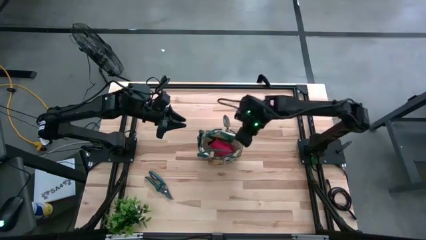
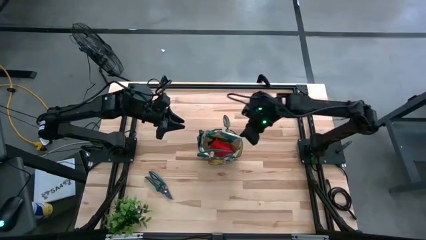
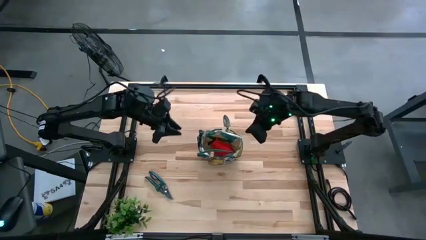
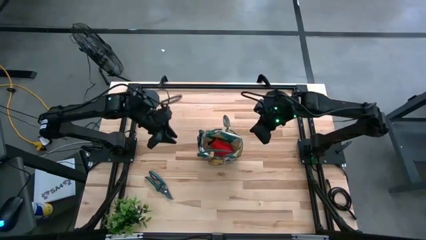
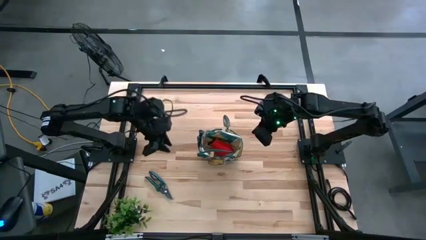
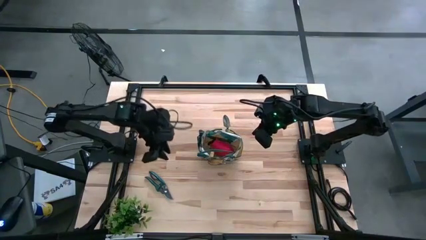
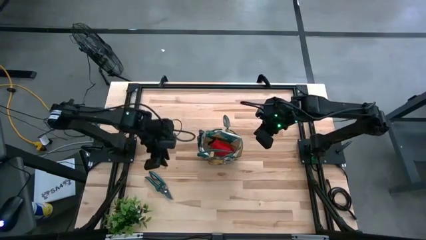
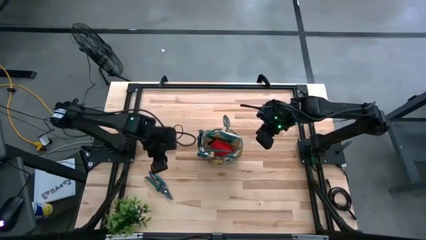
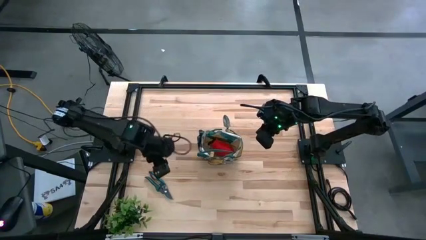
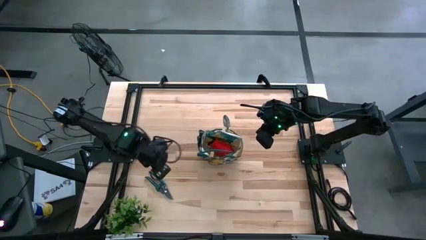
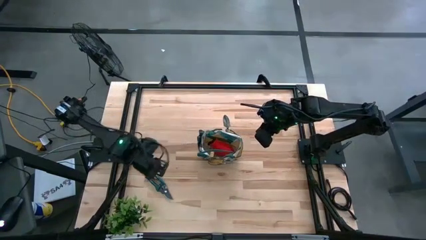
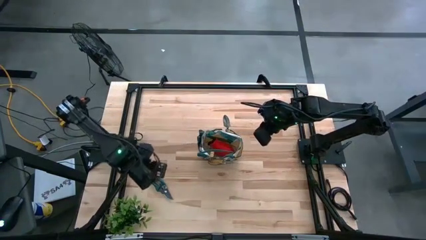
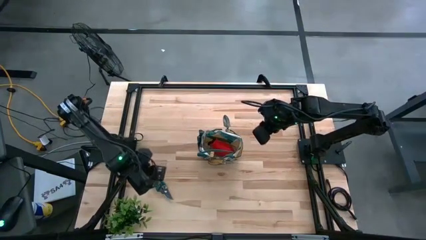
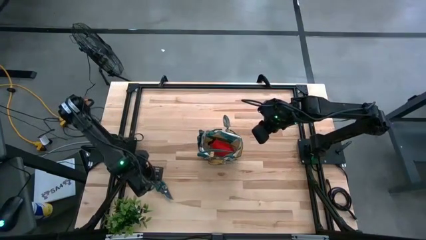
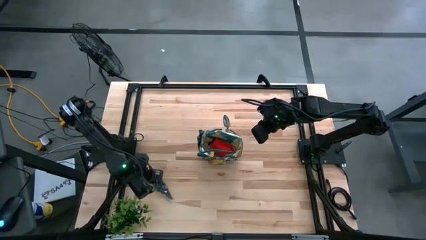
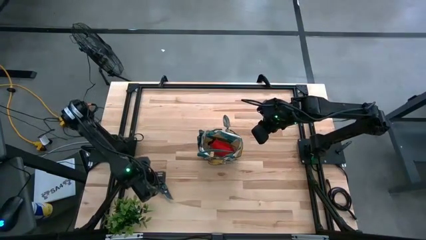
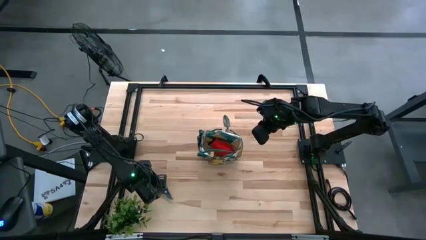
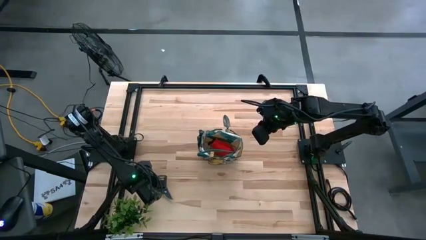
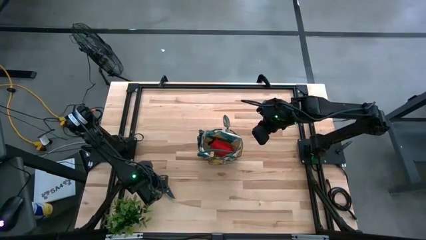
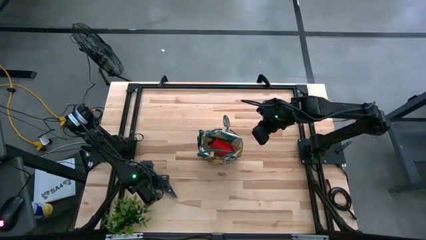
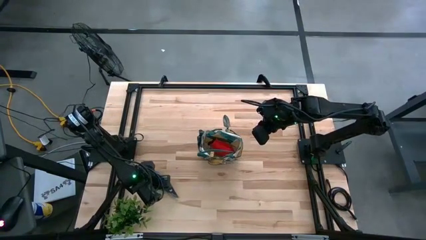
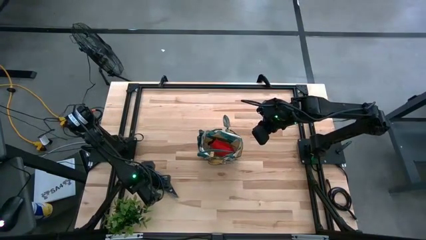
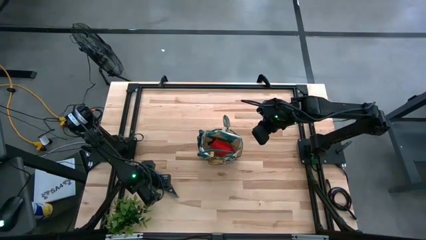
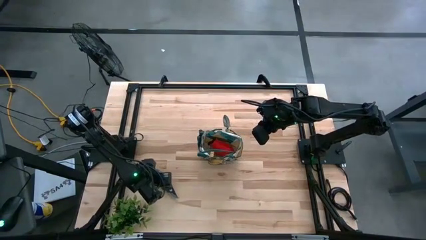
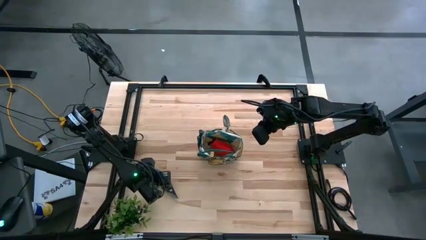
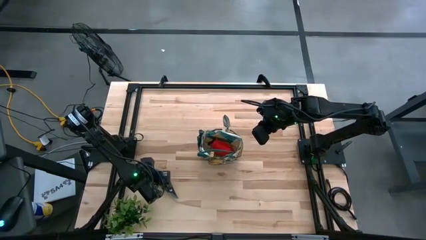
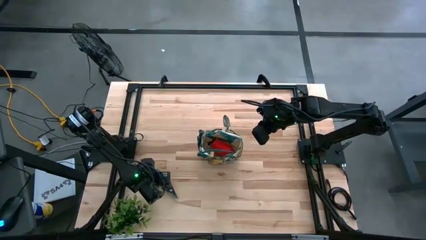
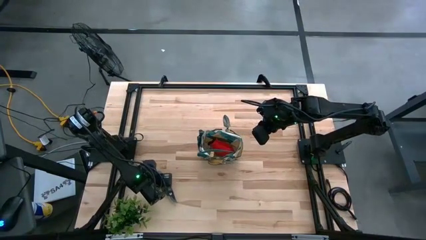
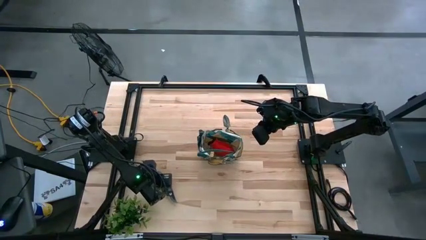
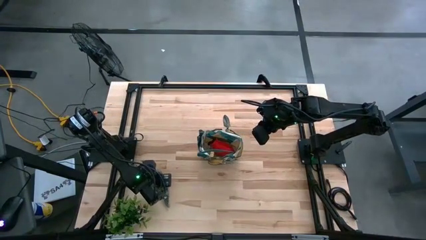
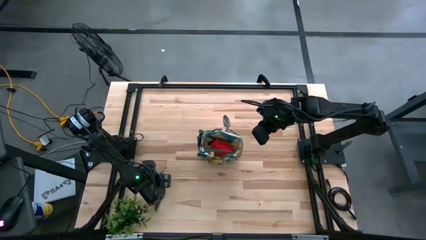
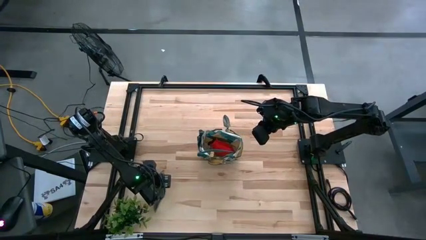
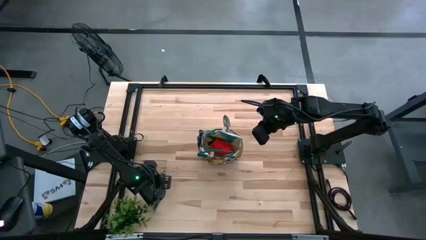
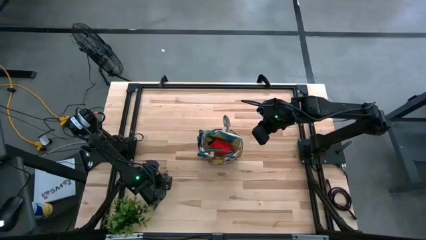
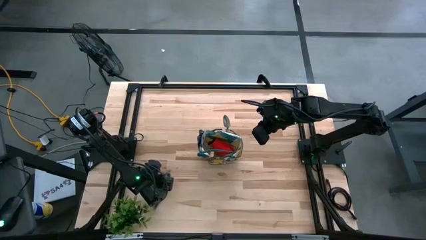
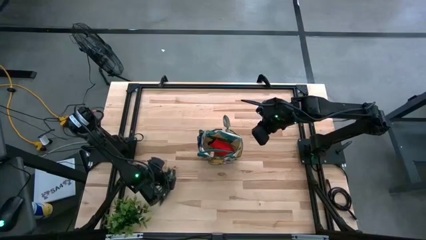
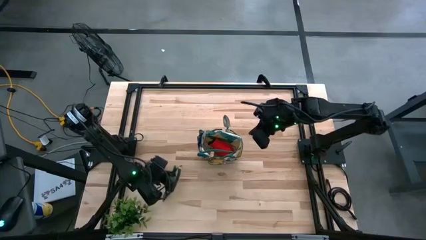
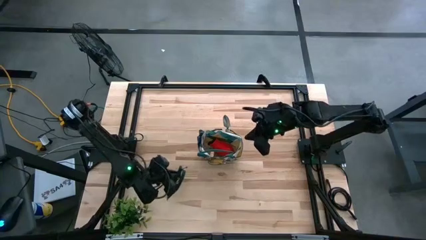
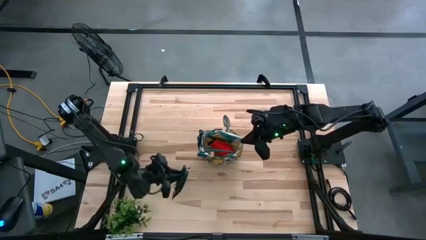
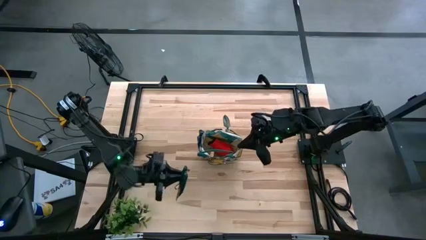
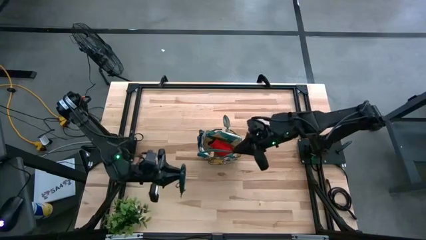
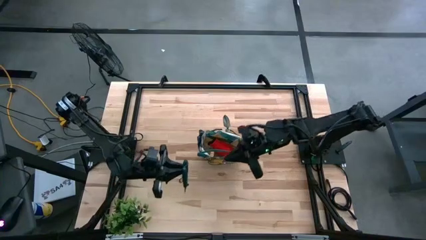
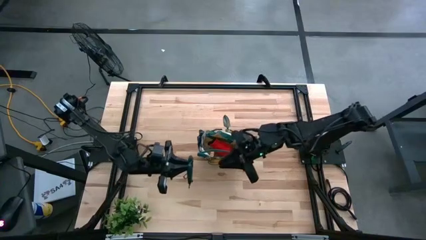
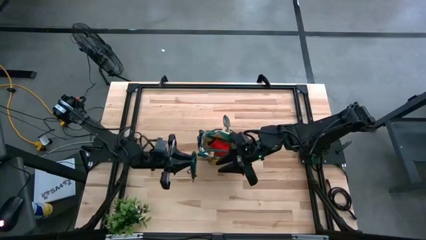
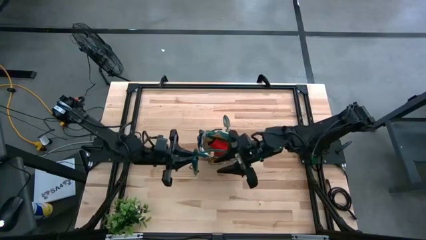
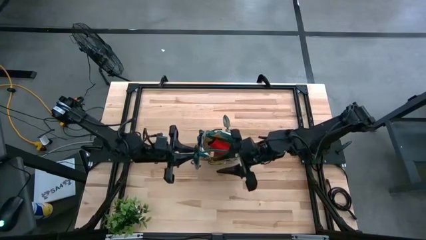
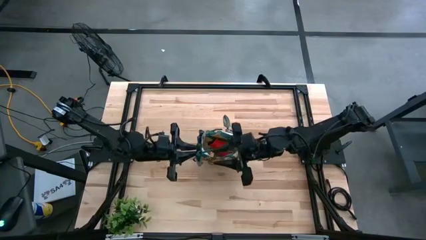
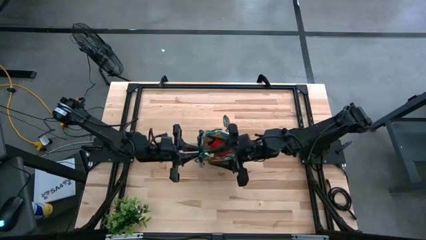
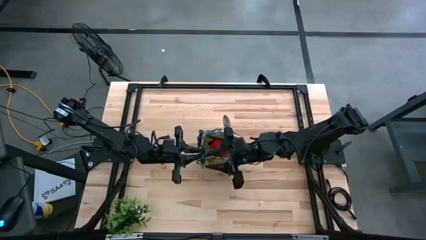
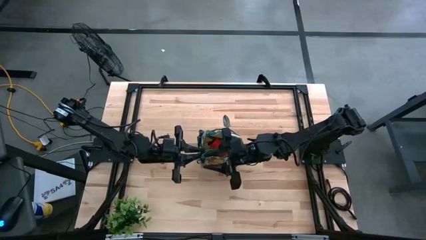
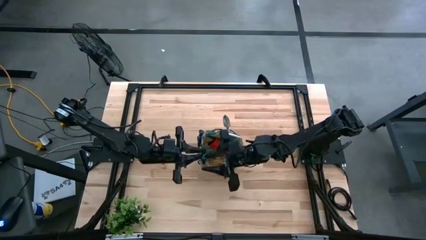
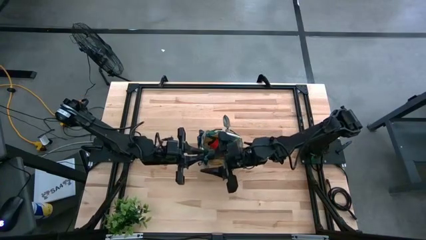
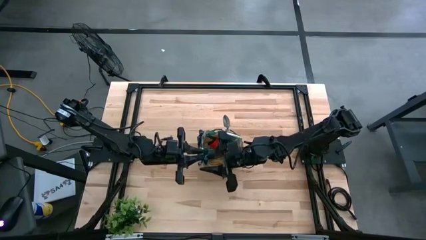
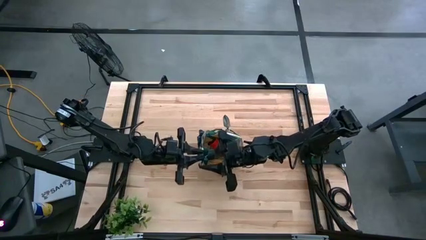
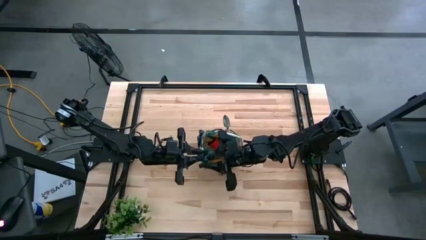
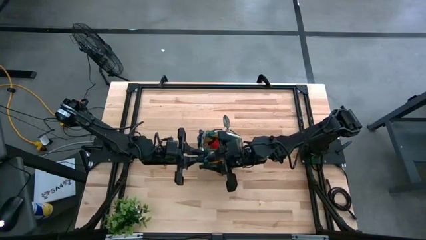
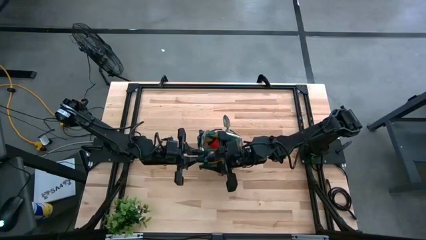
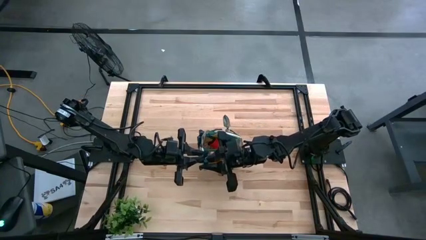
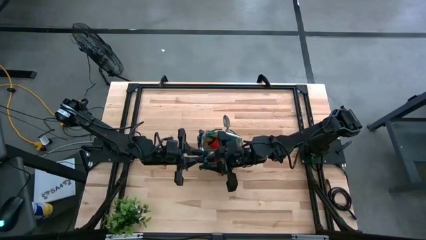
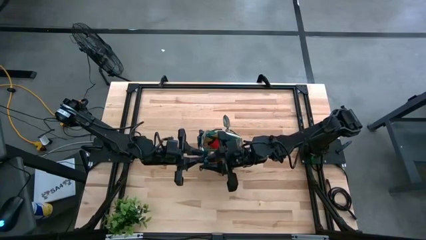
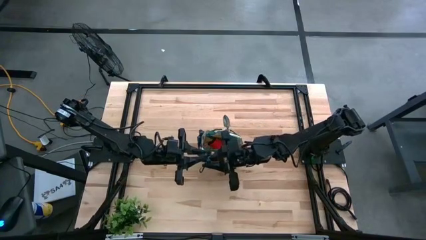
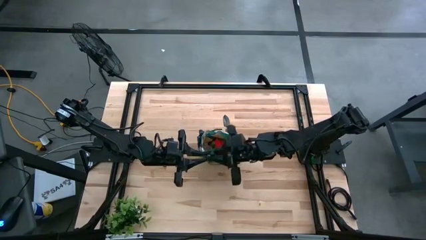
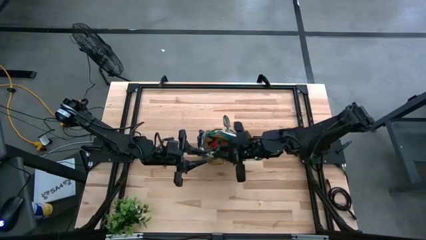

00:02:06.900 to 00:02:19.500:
Task: Pick & Place Garden tools in Gardening bag
Put the green shear scissors into the gardening bag

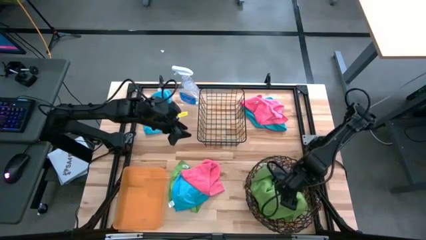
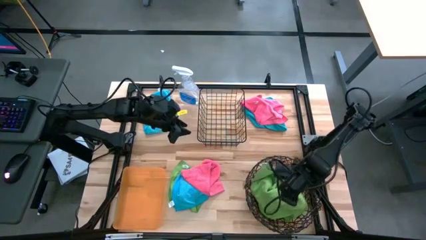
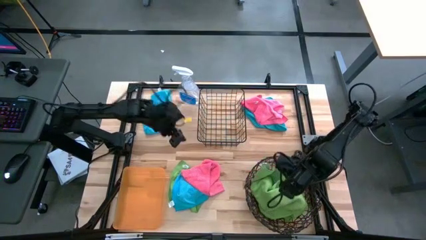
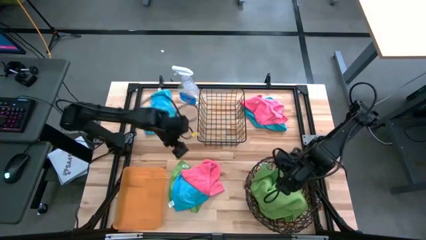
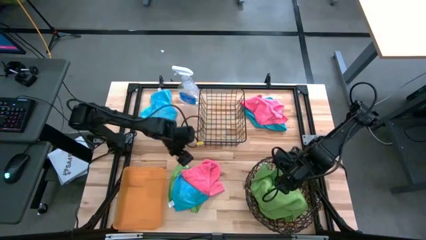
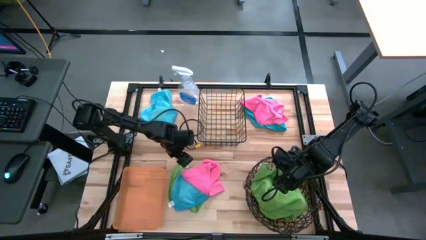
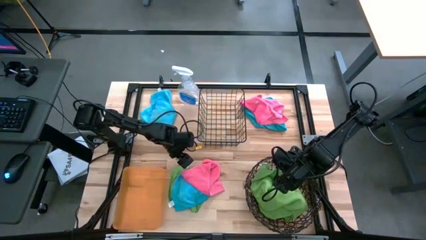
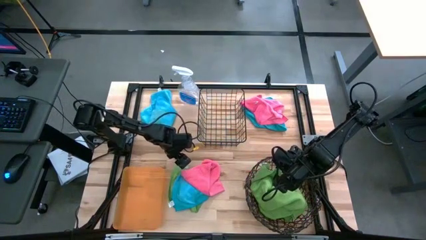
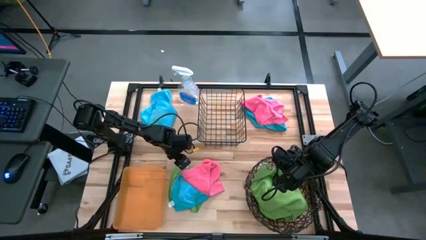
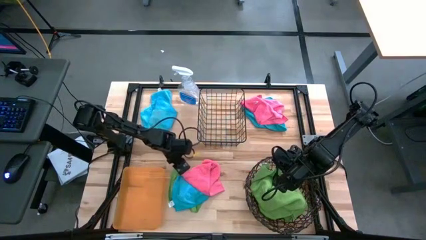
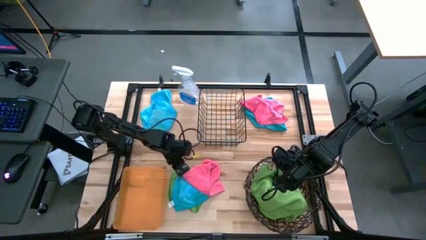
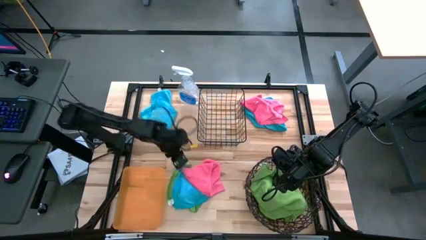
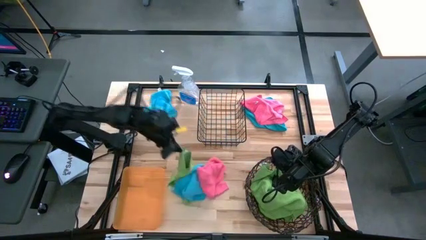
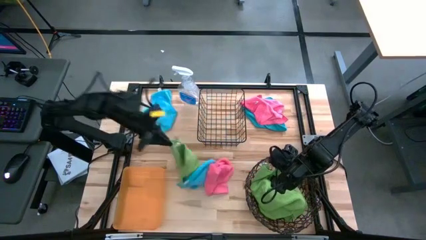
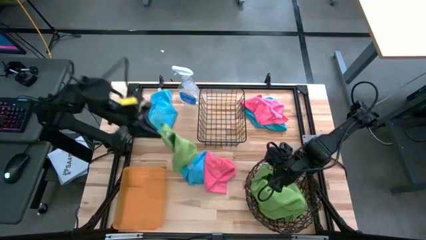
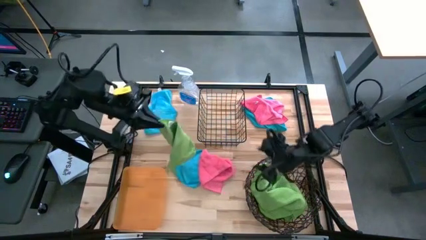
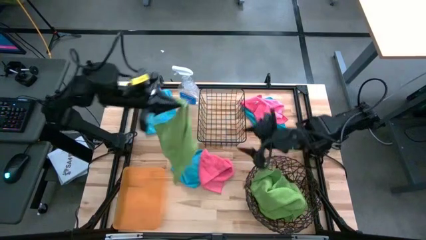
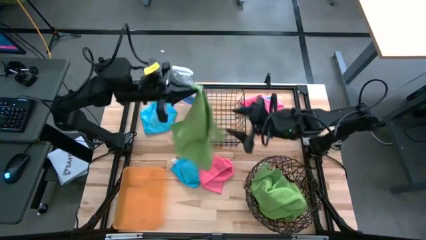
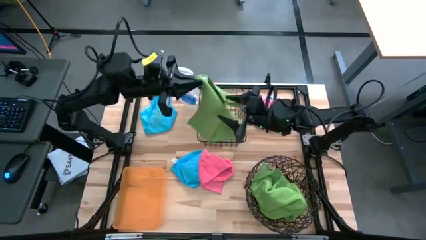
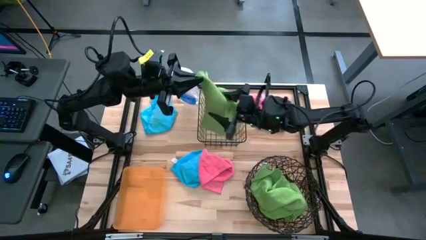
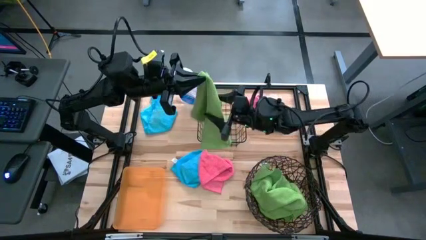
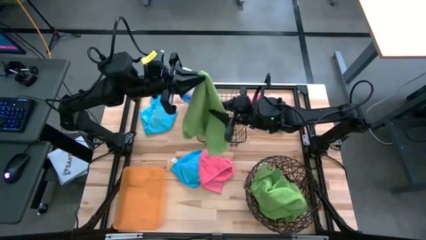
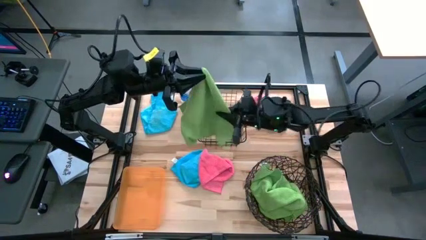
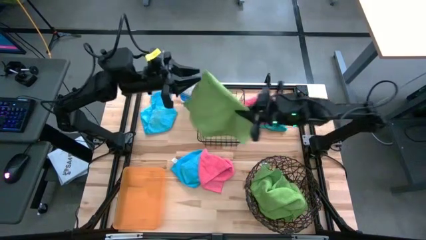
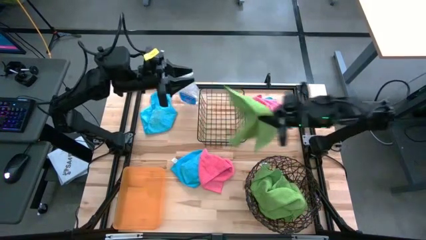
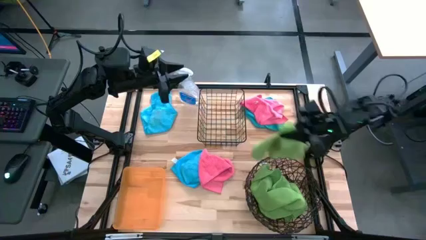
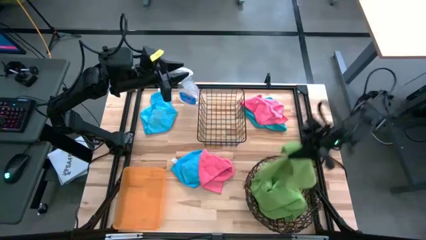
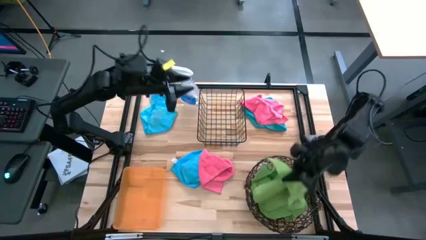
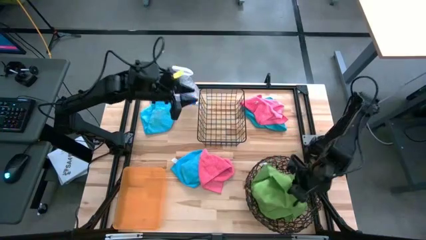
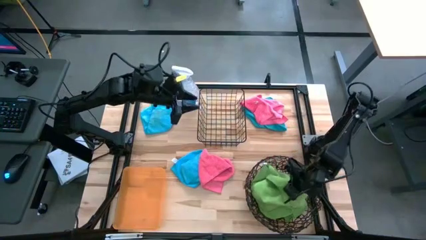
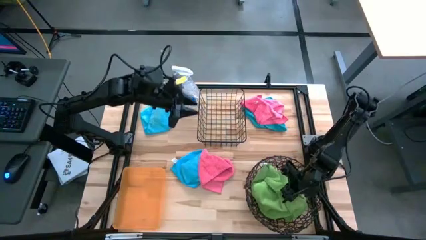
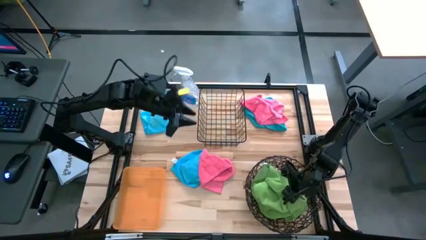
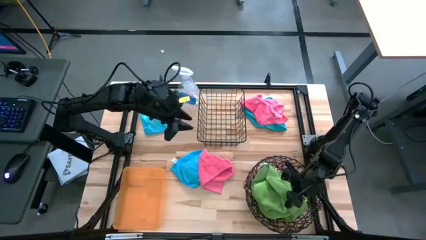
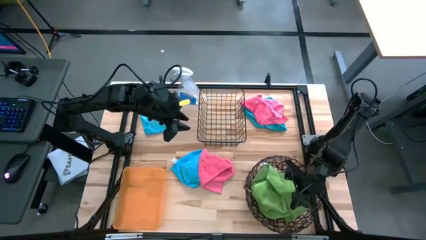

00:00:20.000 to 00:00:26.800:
Task: Sort microfiber towel by color & place in baskets
Put the green towel into the round wire basket
